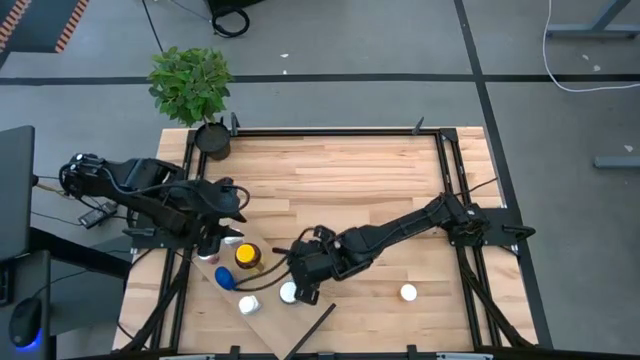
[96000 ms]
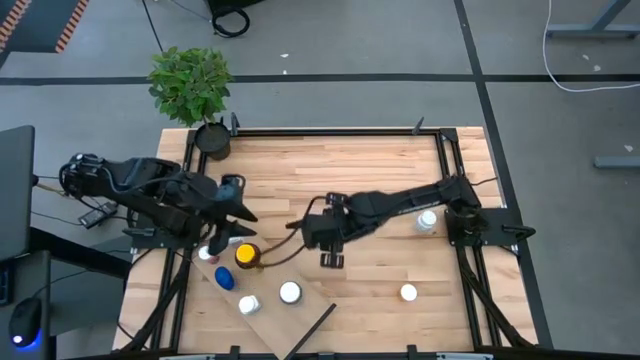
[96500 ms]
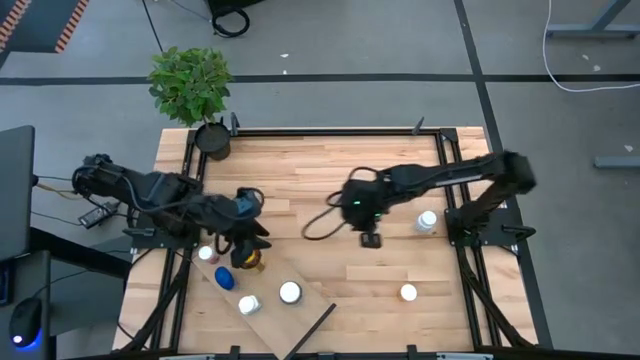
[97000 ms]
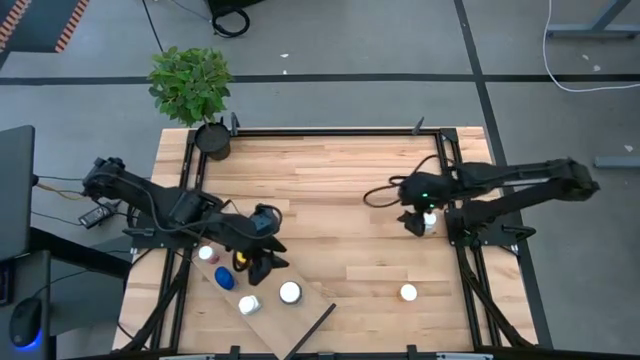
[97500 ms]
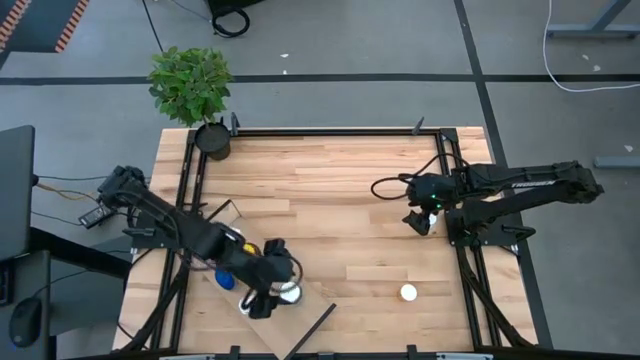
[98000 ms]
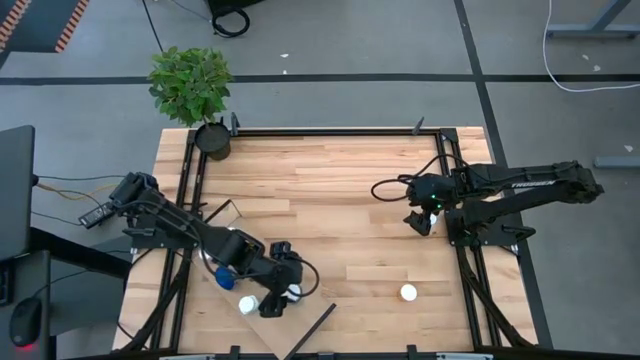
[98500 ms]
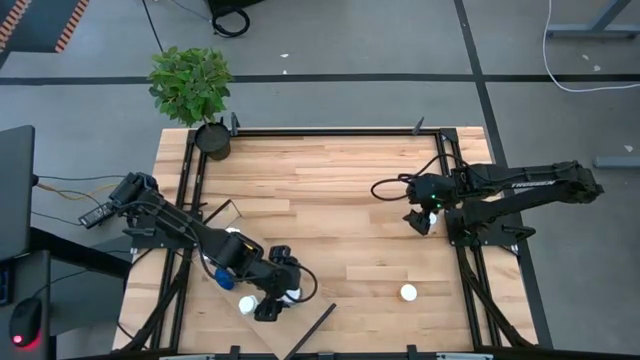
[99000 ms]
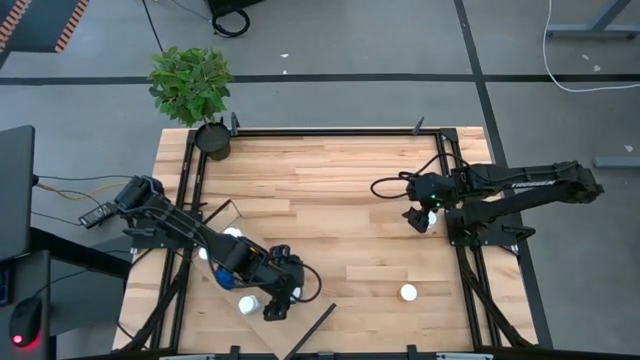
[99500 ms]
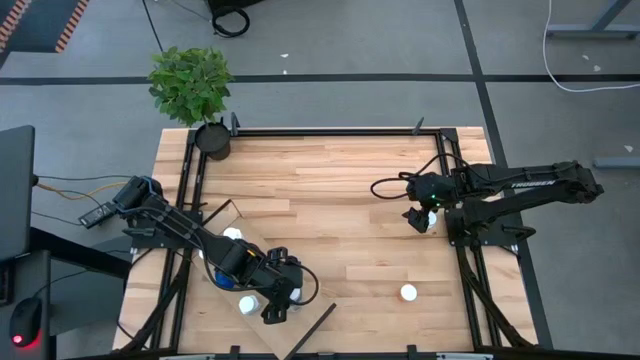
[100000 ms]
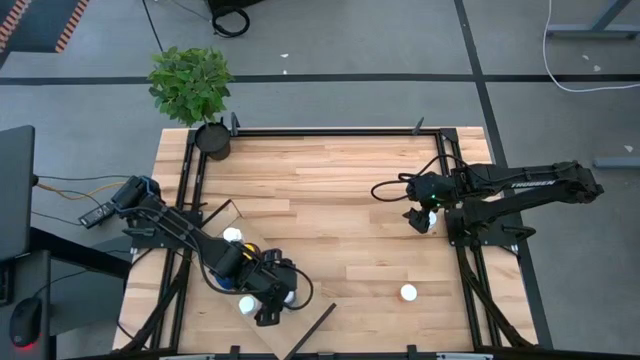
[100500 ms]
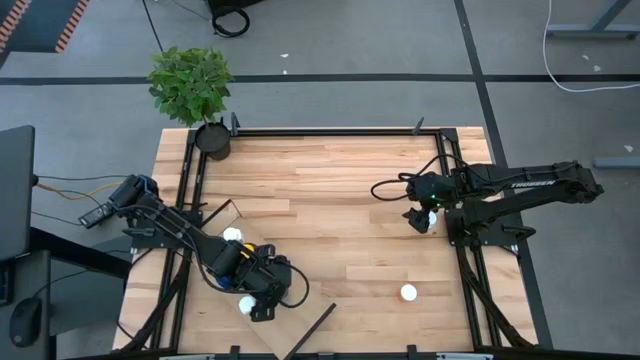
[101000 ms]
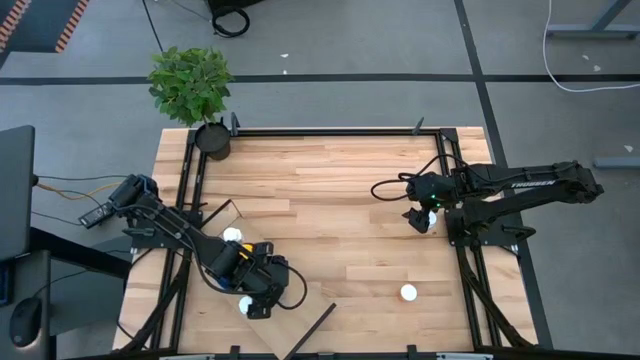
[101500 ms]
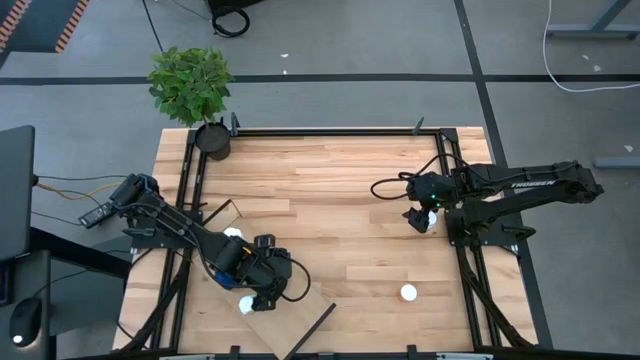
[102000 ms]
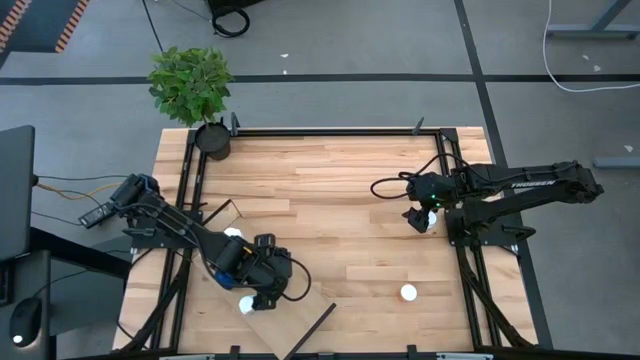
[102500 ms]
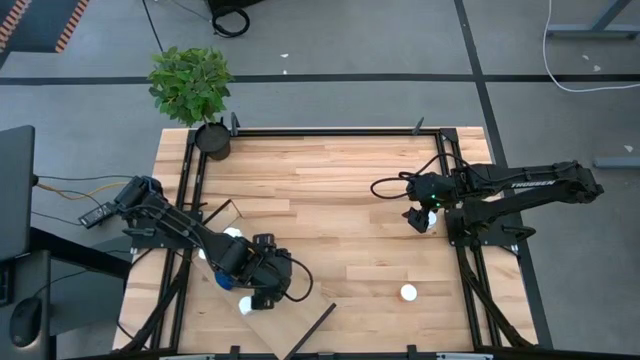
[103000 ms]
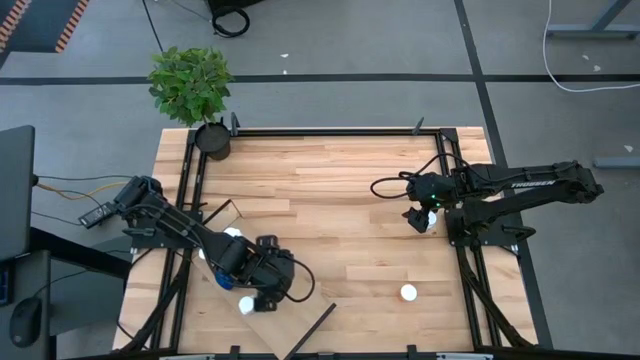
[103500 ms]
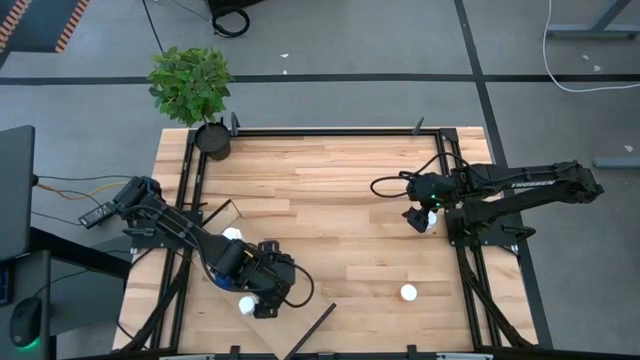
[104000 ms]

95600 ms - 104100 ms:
Task: Pick and place medicine bottles onto shelf by color
Adjust the green pill bottle on the shelf

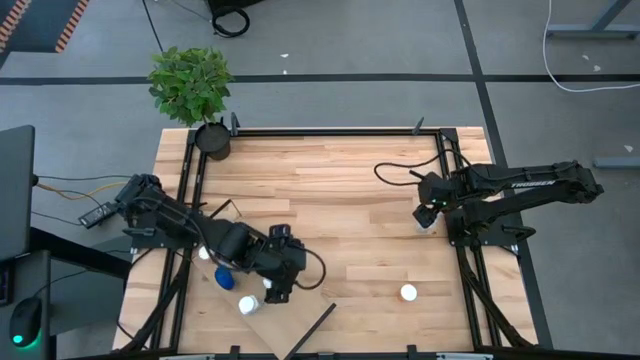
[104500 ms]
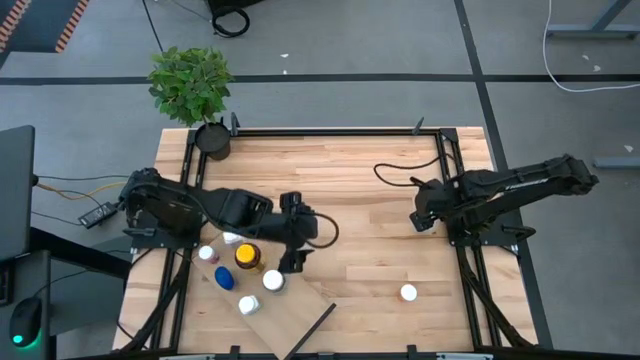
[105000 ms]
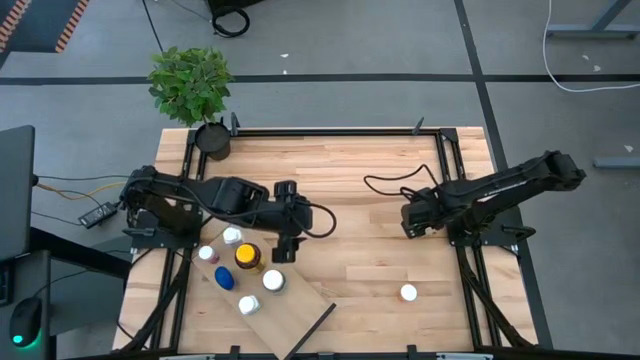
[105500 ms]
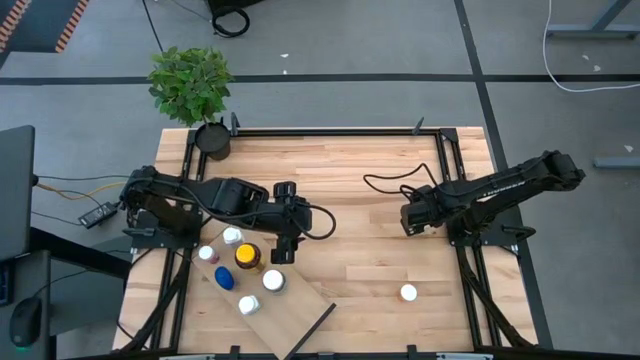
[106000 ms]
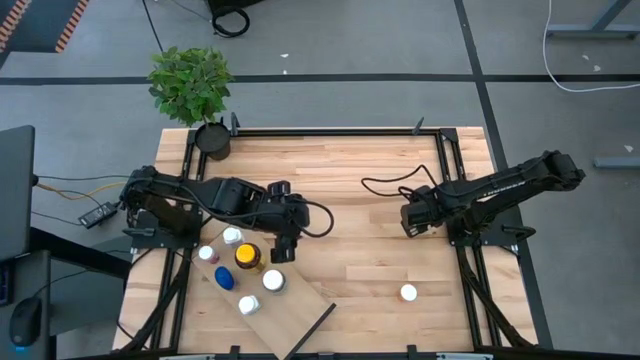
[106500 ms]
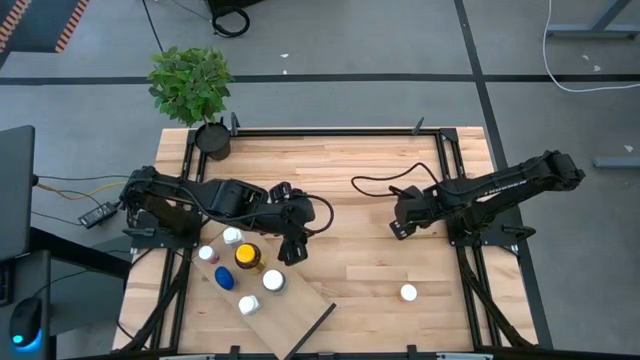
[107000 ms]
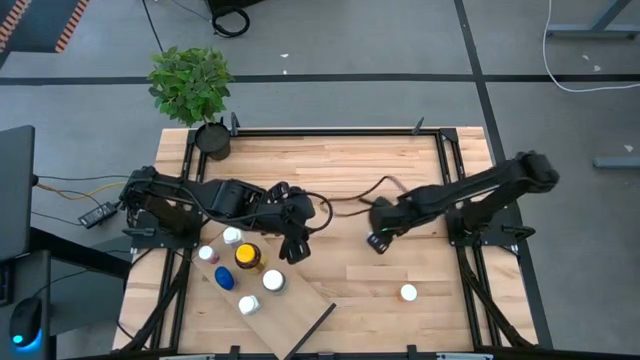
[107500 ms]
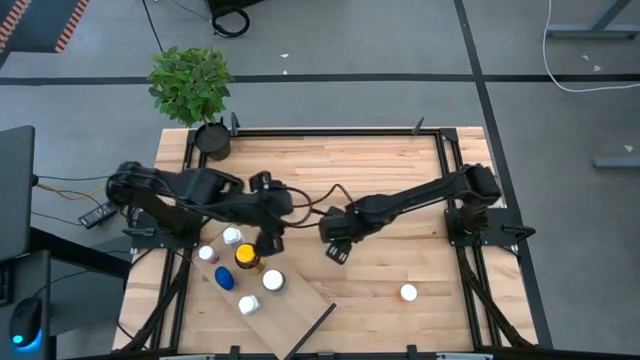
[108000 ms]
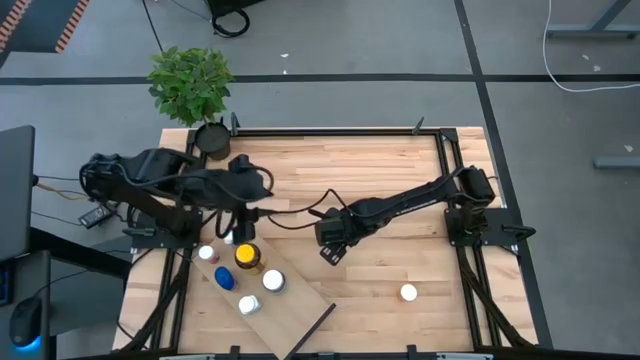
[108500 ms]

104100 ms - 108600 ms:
Move the white pill bottle to the middle of the table

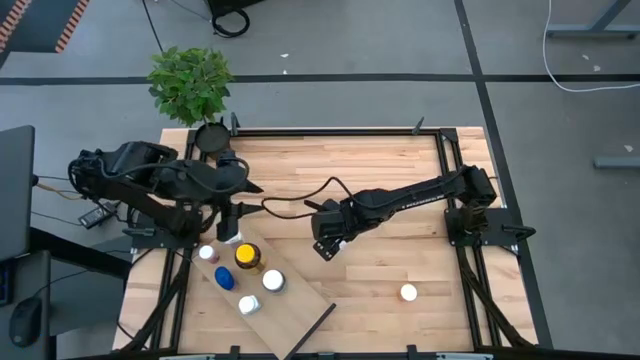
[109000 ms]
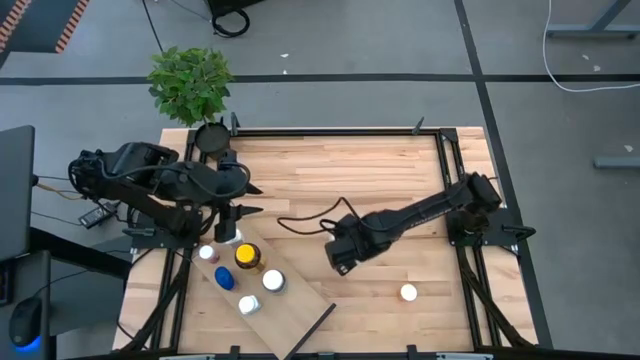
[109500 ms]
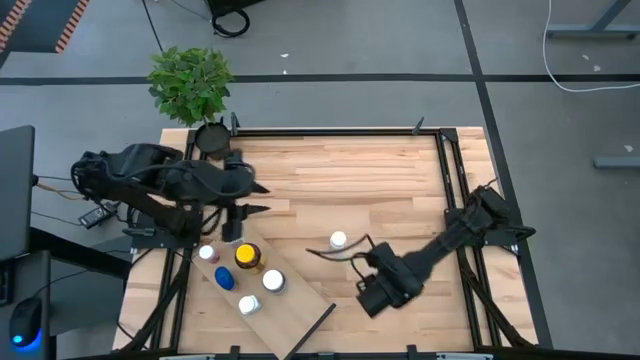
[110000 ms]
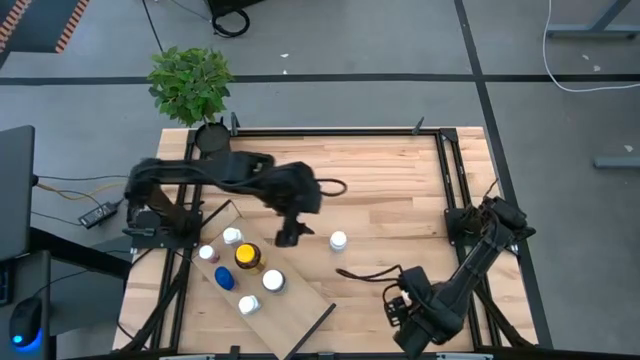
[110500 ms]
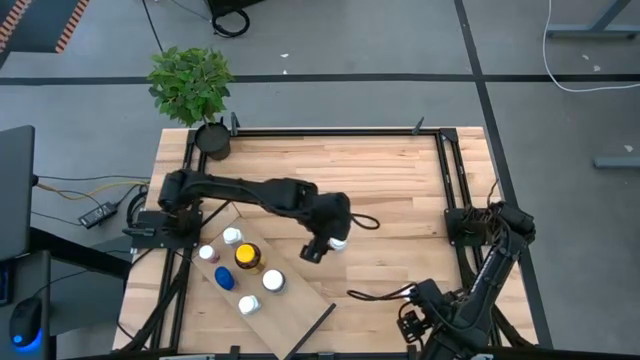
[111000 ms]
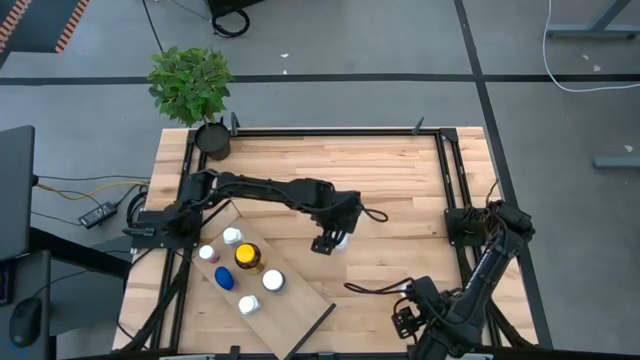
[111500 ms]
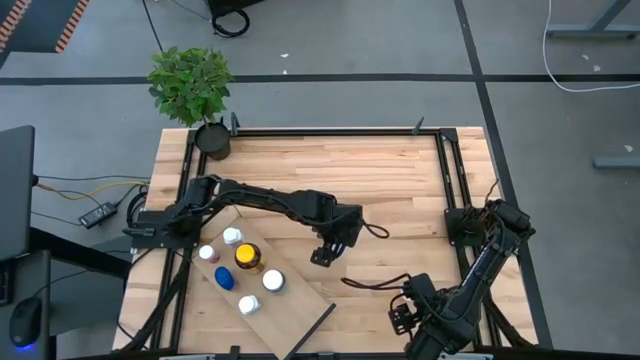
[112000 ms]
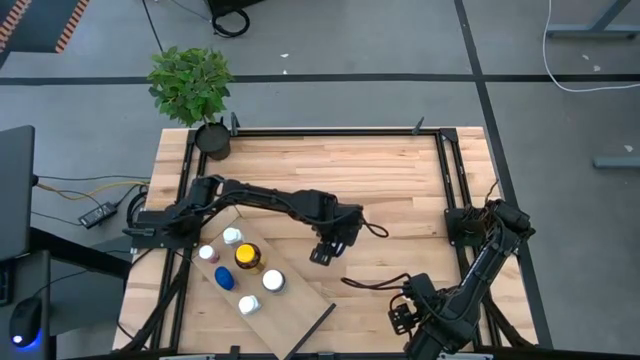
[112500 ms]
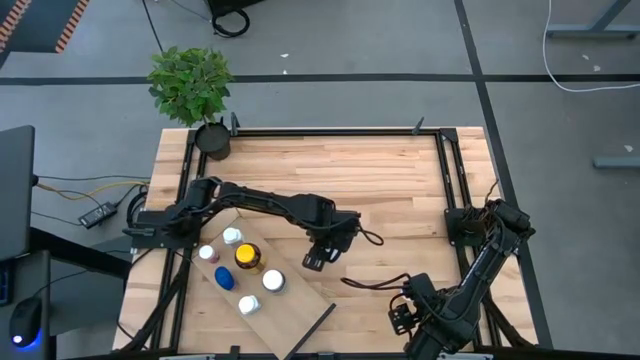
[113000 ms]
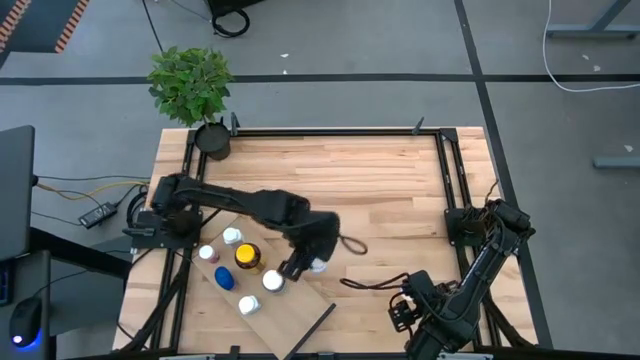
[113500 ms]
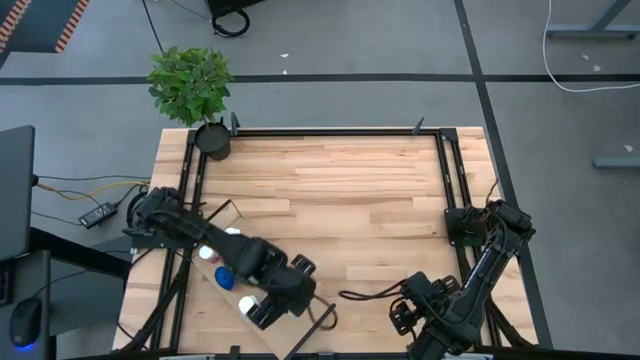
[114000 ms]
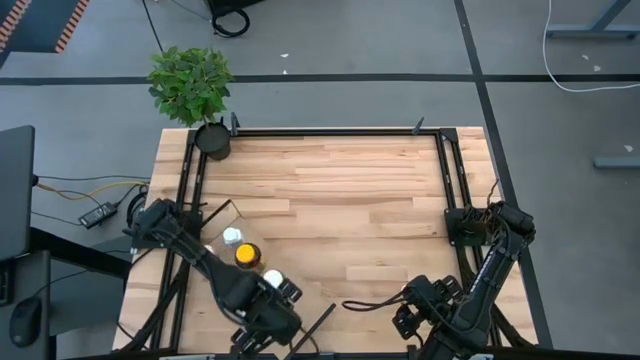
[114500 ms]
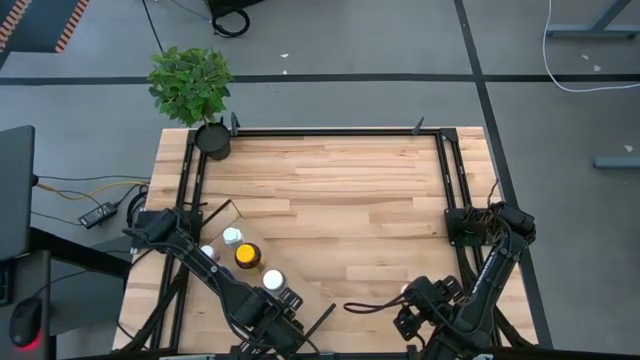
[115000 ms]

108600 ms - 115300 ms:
Put the white pill bottle on the shelf

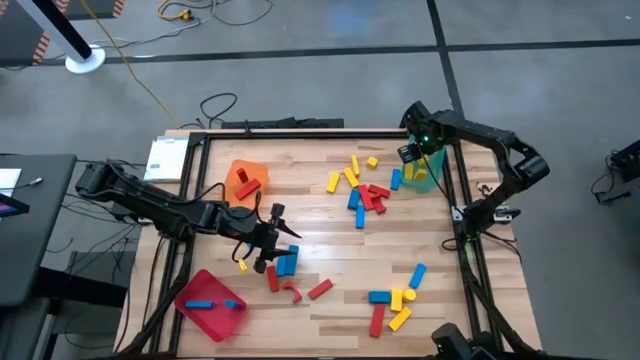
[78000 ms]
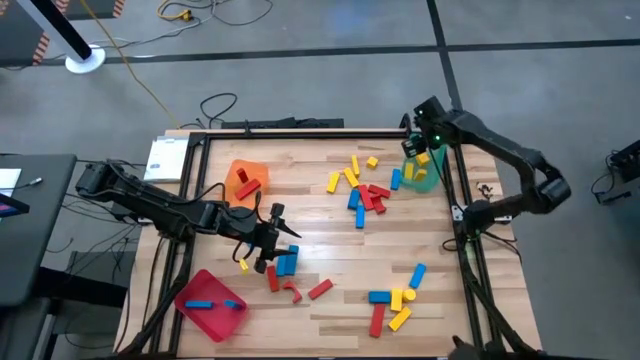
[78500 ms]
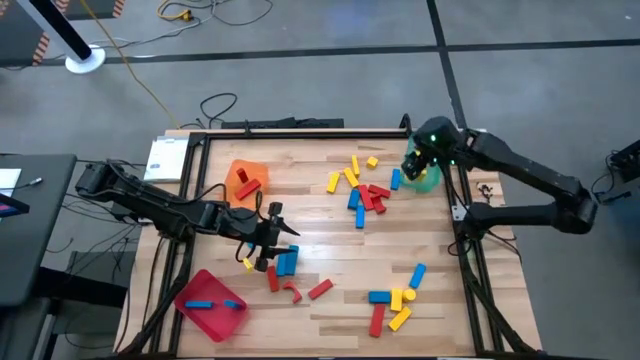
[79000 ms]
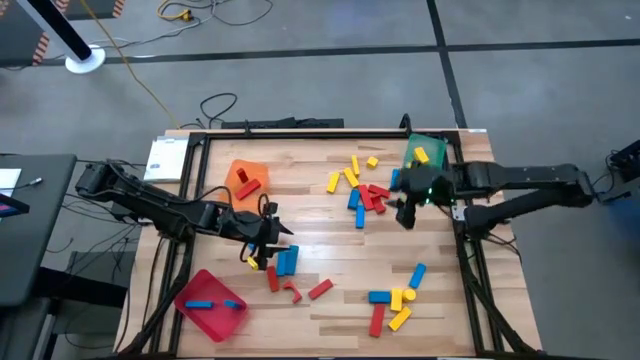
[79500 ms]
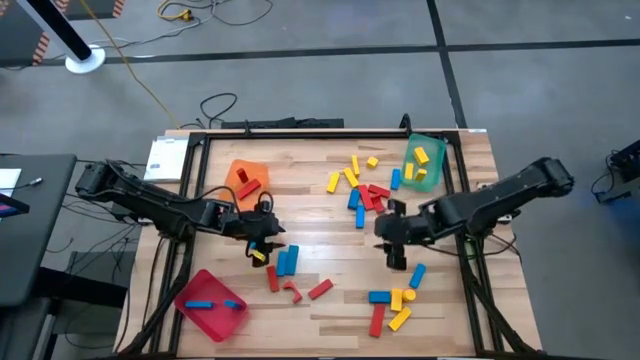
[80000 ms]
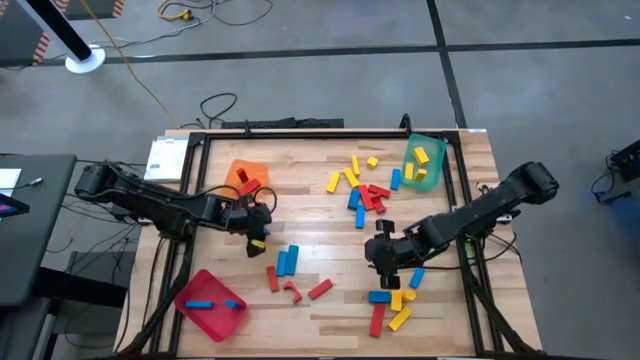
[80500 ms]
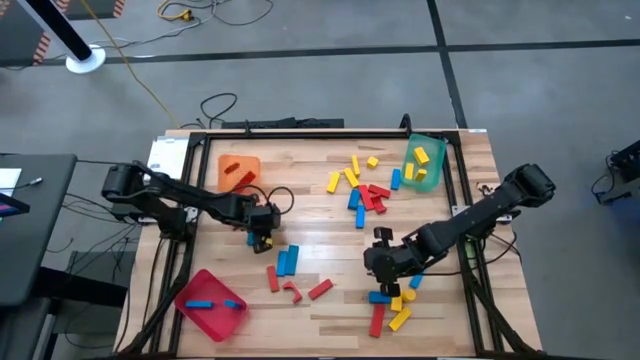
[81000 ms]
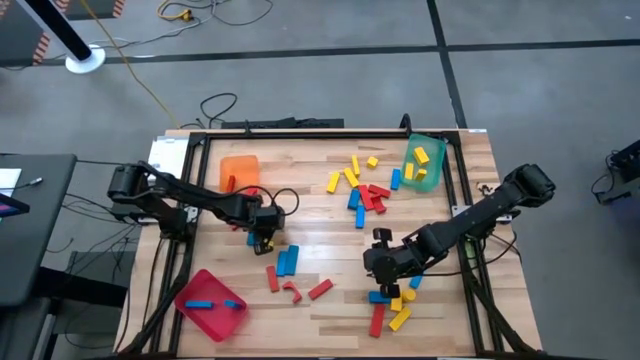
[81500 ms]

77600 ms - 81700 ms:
Task: Sort blocks
Put the blue wooden block into the red bin
